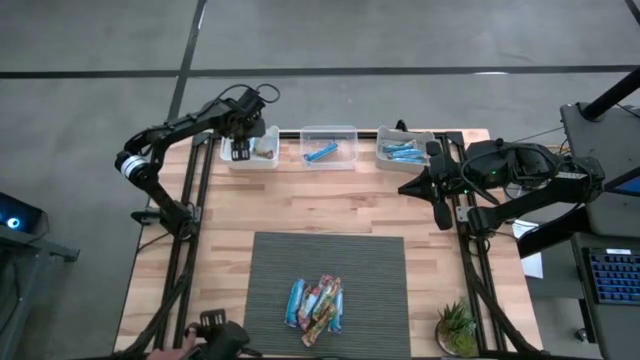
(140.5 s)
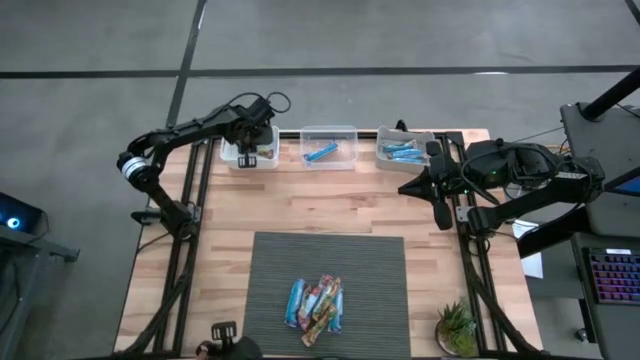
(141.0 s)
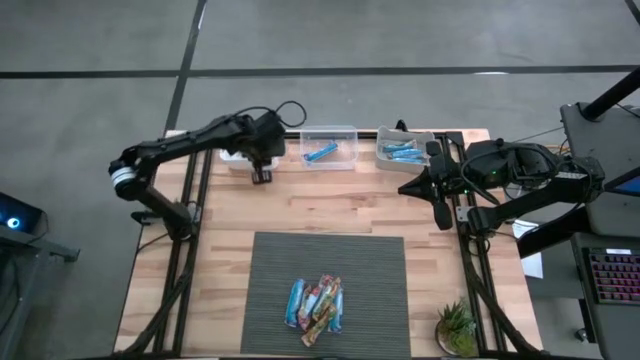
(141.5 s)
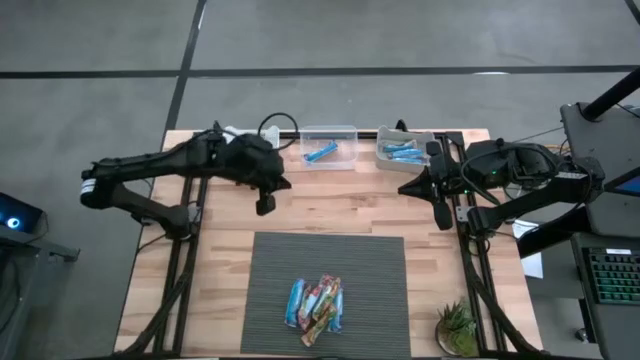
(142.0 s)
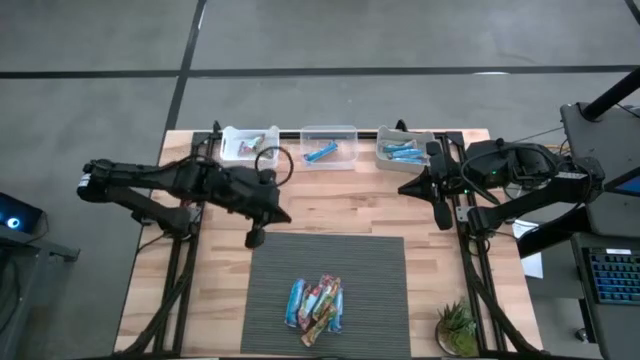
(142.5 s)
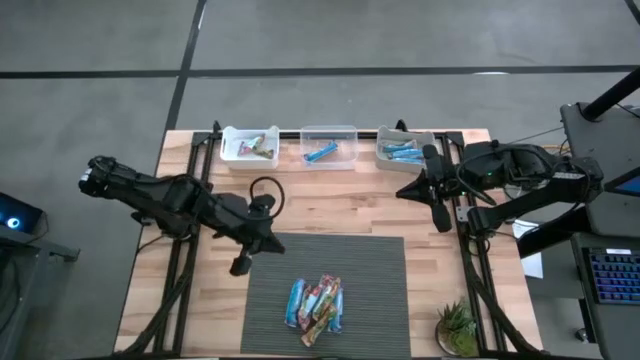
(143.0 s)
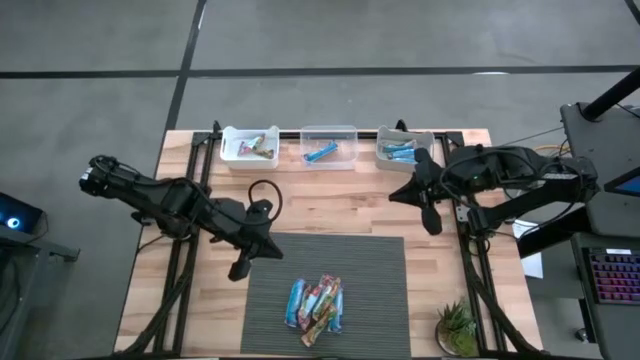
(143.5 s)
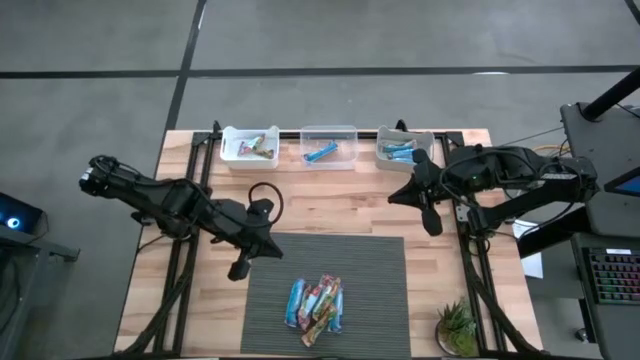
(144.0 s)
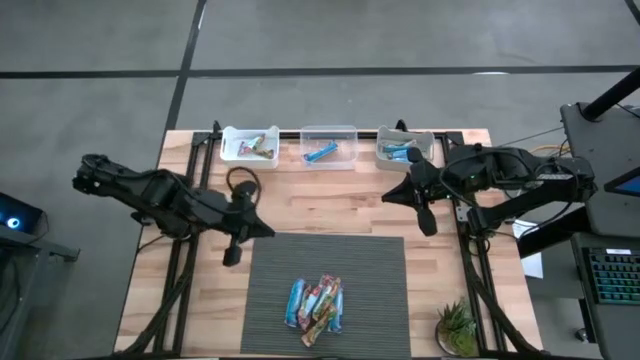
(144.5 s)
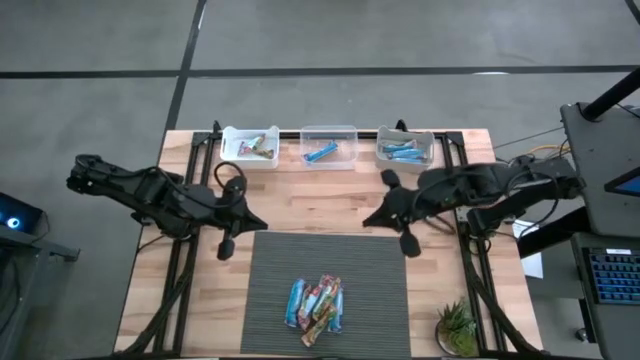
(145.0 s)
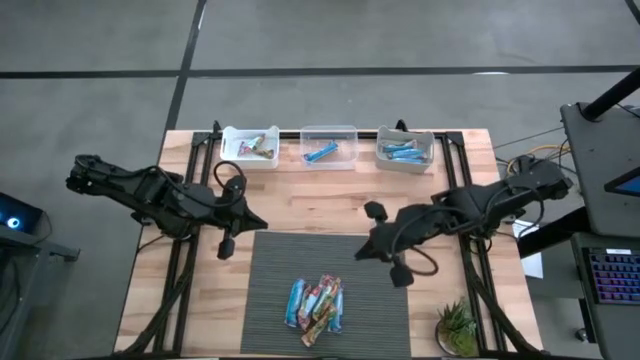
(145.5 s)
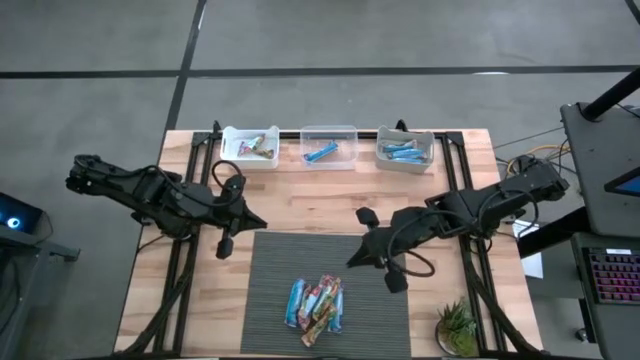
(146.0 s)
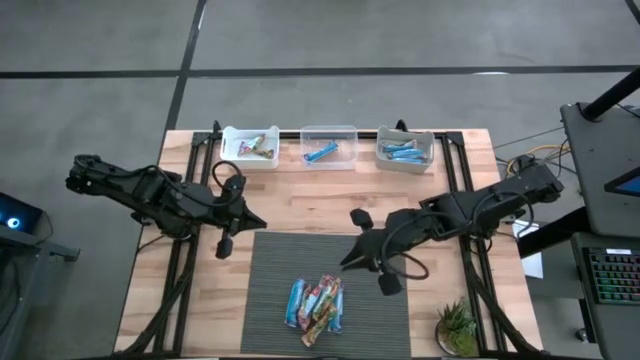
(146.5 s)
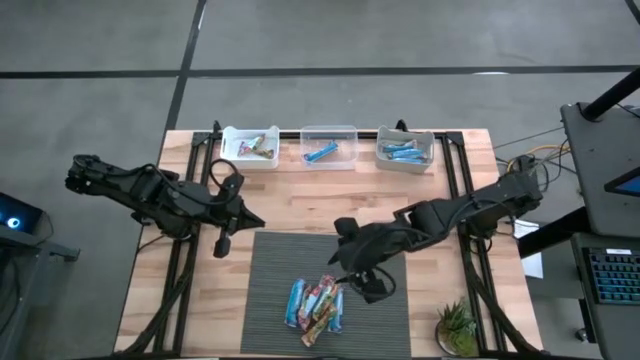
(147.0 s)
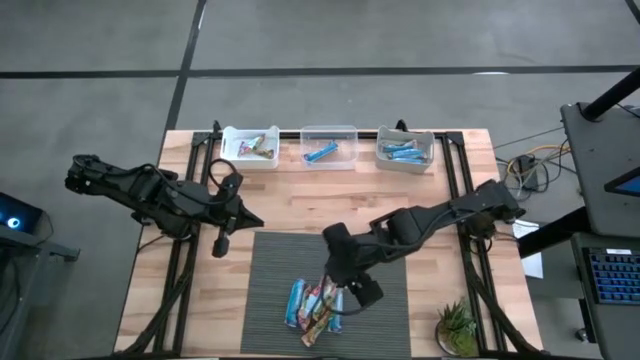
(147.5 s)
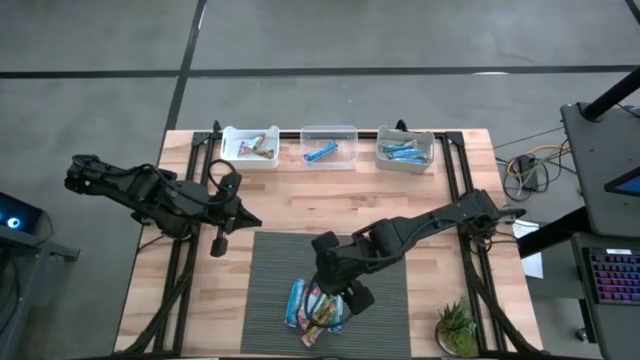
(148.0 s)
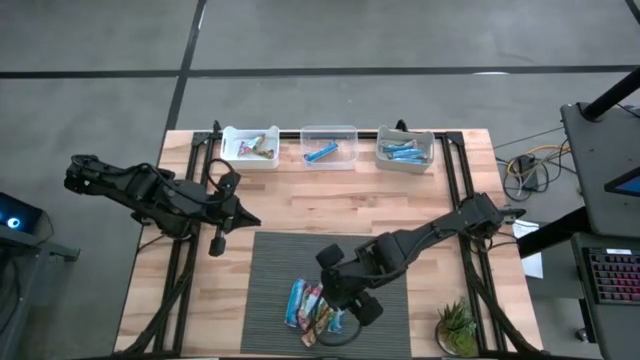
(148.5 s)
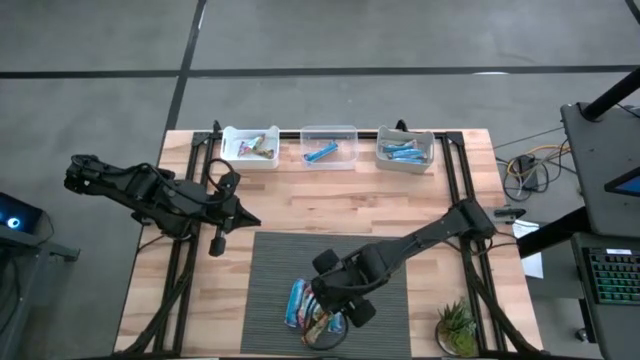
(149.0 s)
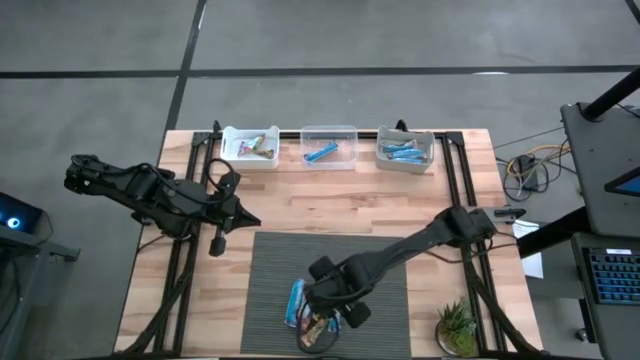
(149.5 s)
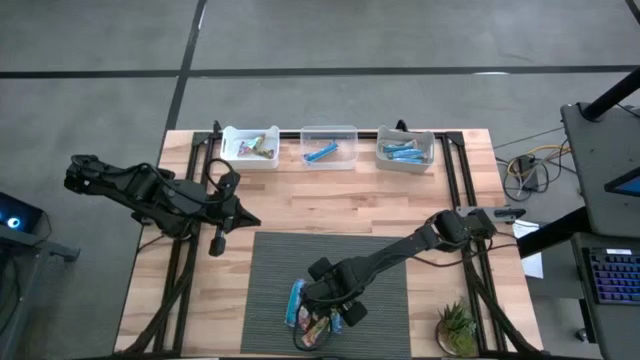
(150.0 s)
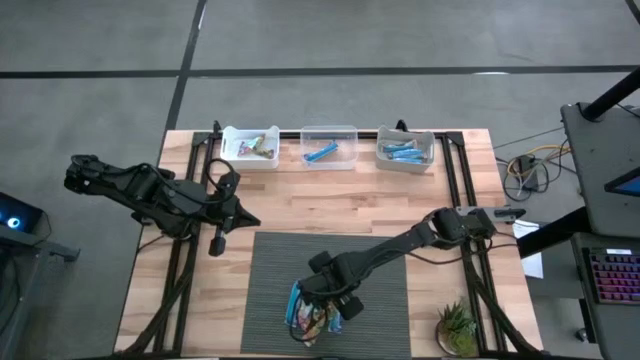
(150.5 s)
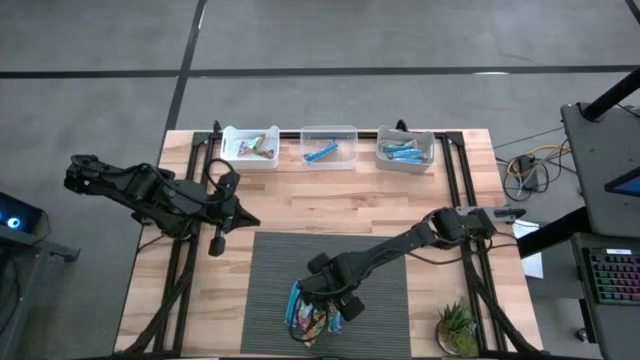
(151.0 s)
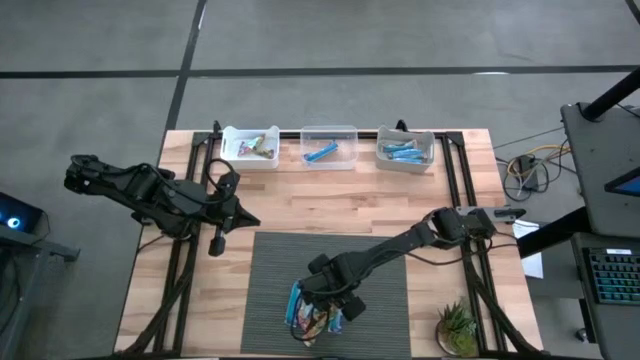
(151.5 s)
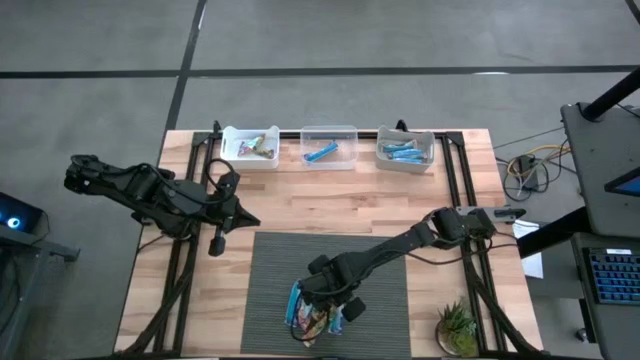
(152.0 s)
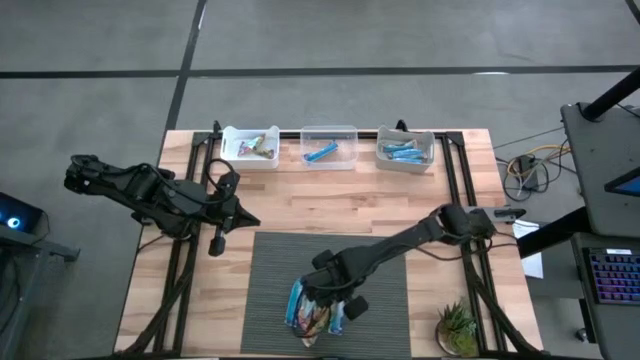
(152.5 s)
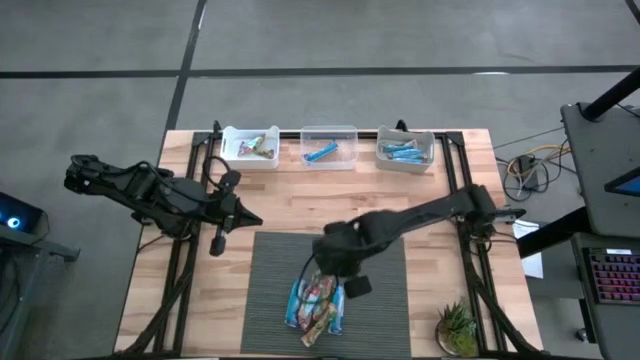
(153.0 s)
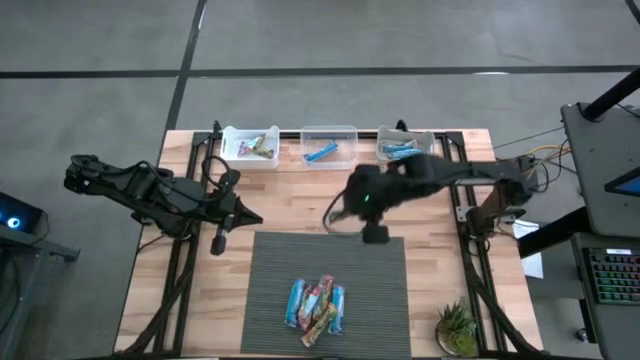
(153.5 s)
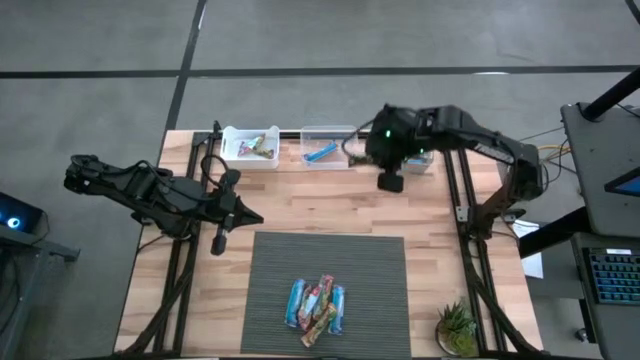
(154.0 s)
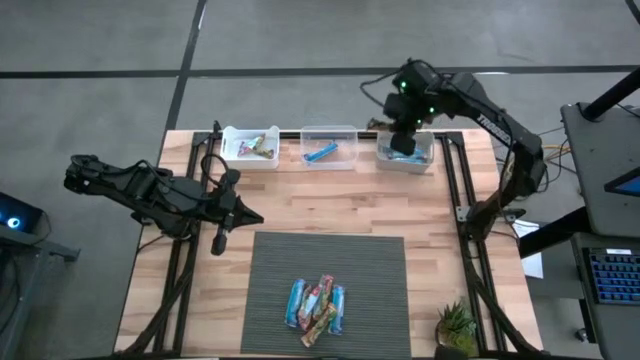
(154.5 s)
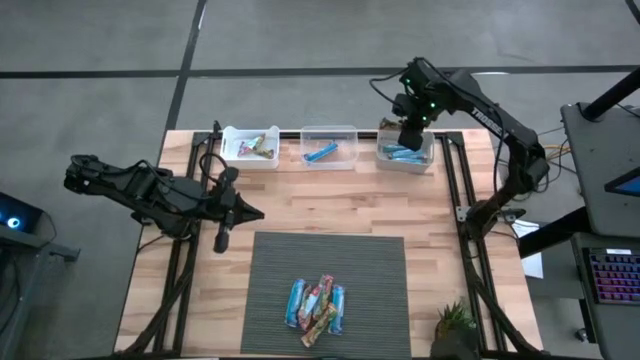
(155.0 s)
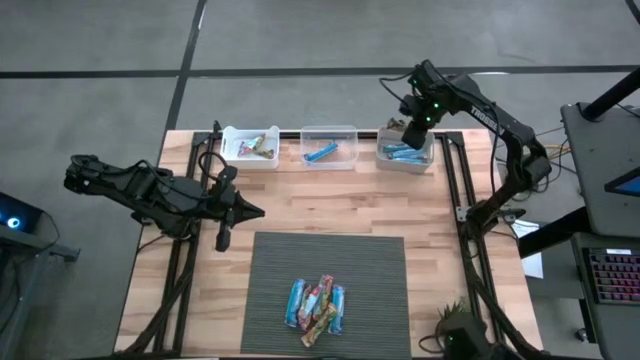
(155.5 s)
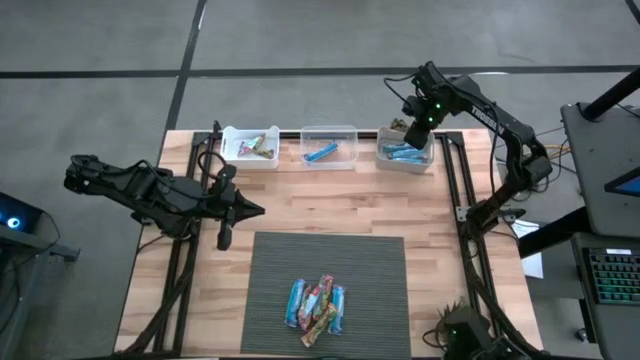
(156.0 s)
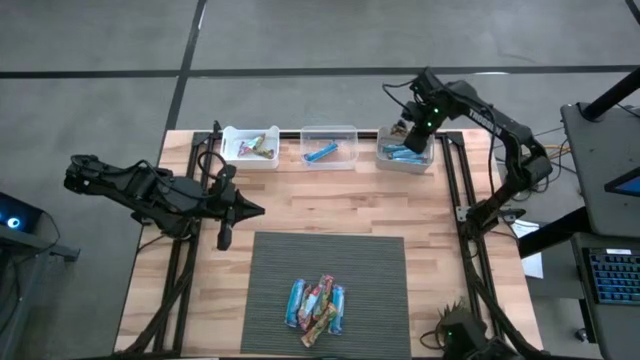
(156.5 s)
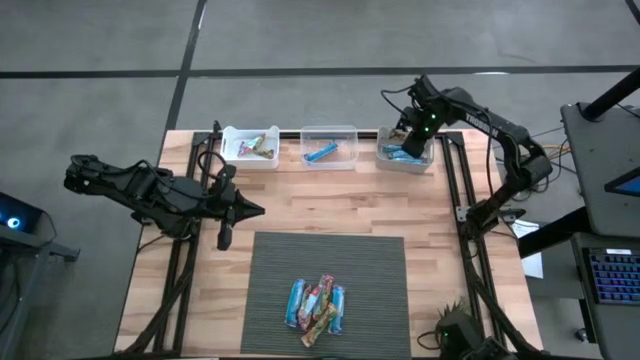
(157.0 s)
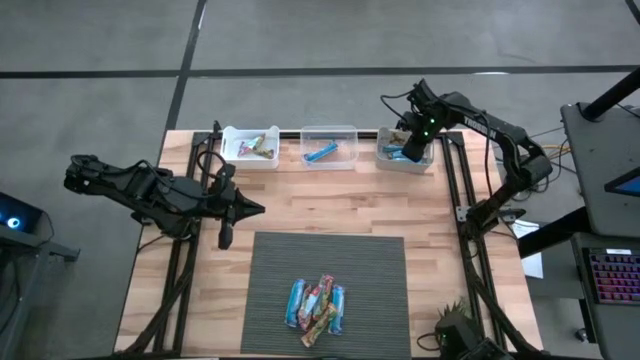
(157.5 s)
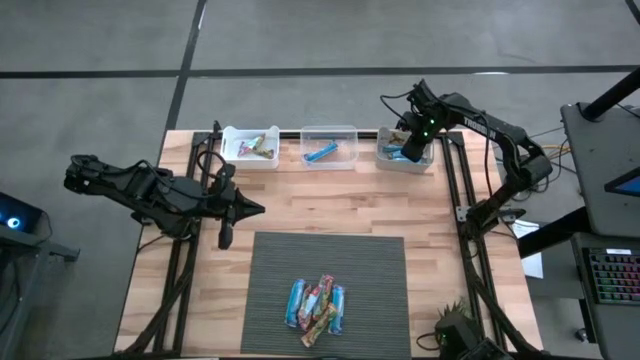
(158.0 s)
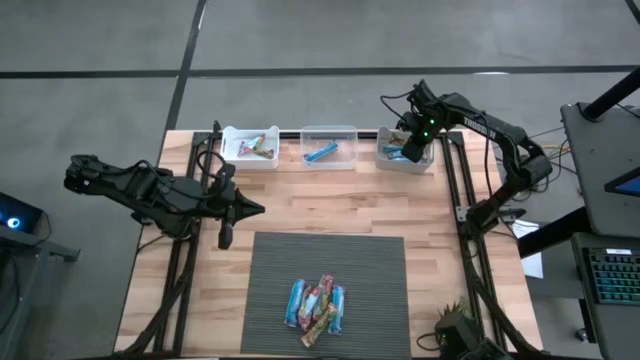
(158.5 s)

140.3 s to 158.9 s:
Task: Pick and place Granola Bars by type
Put the yellow granola bar into the gray bin

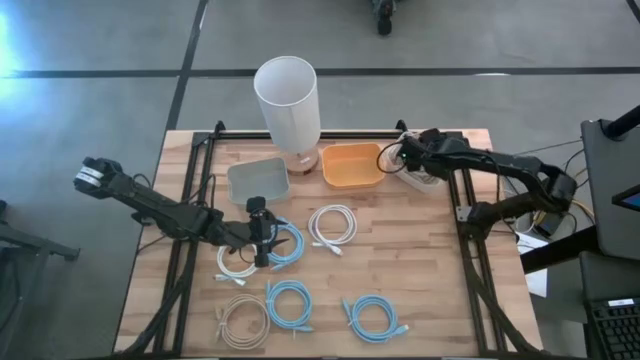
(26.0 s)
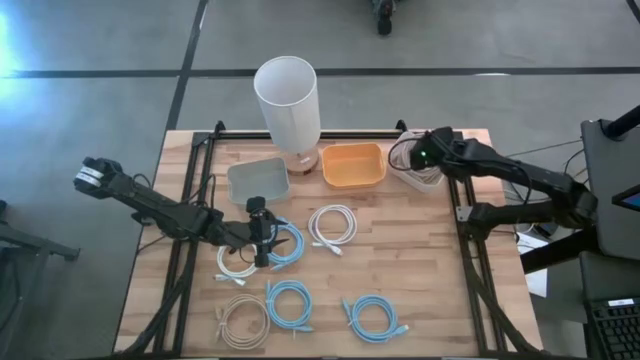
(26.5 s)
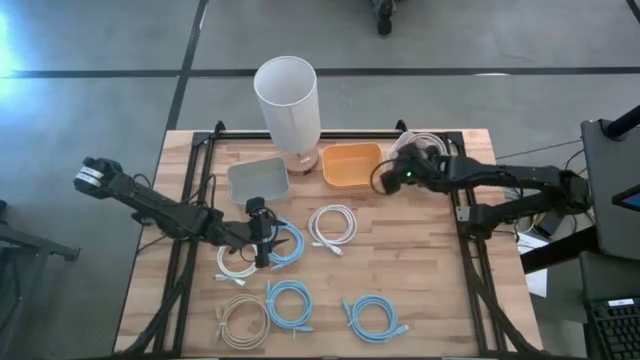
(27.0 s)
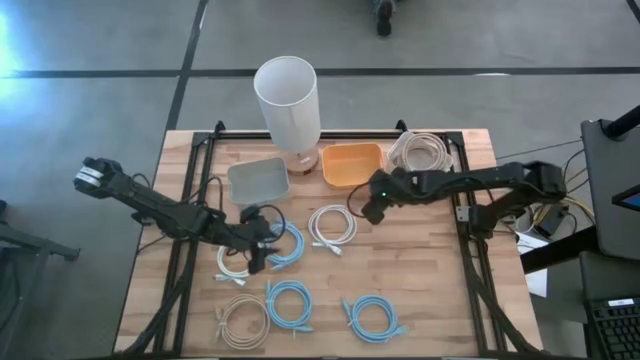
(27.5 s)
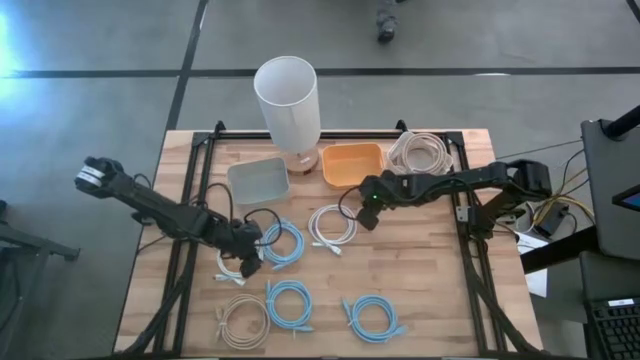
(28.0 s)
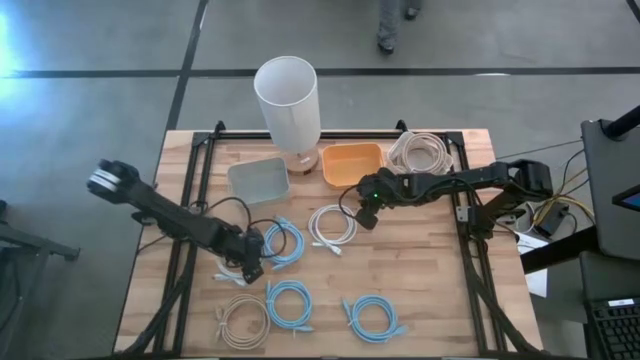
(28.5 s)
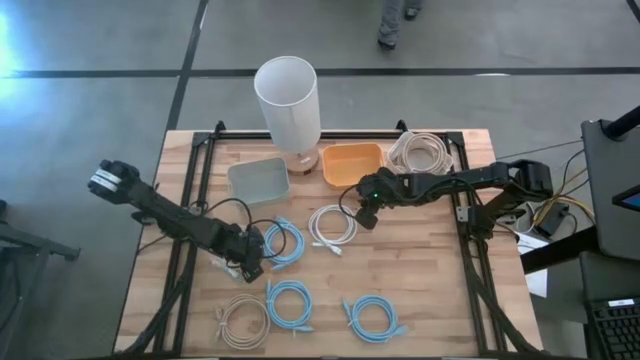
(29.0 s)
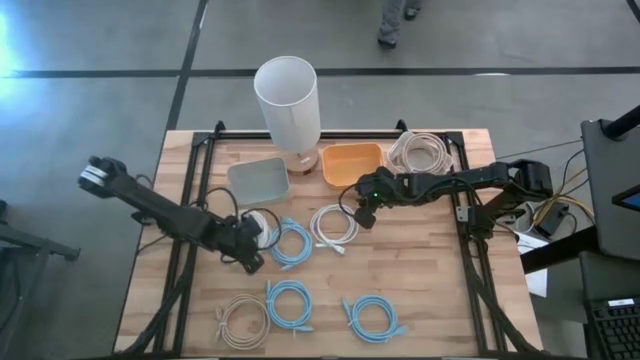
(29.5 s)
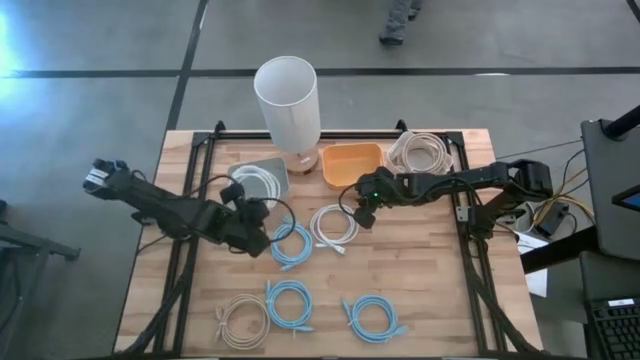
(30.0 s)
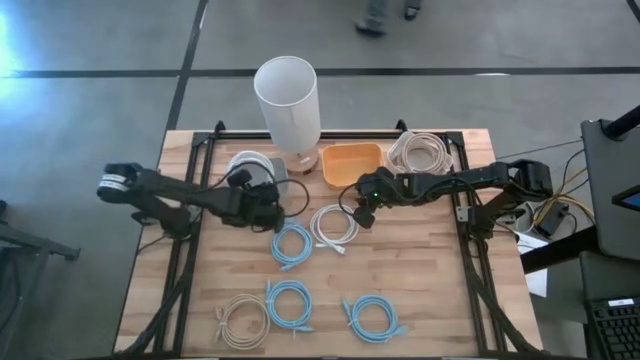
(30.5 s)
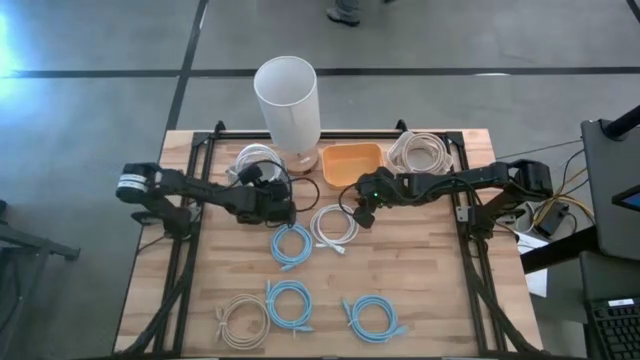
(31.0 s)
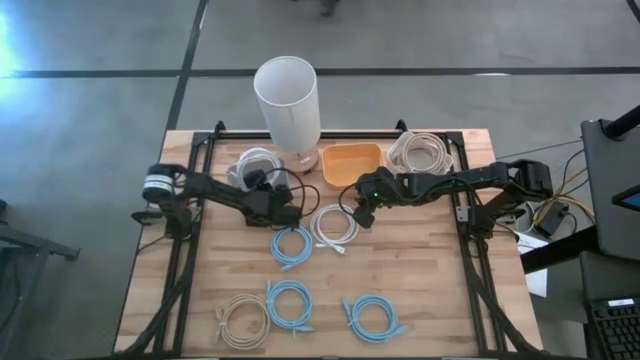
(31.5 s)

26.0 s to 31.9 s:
Task: Sort HDMI cables
Put the white bin HDMI cable into the grey bin
